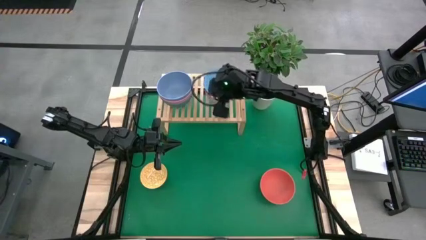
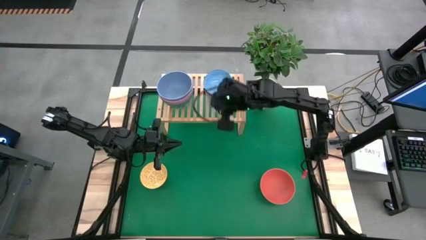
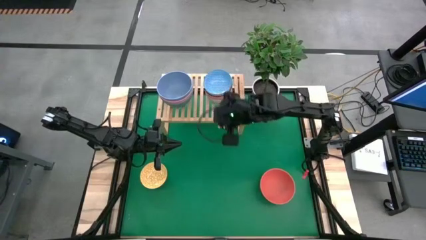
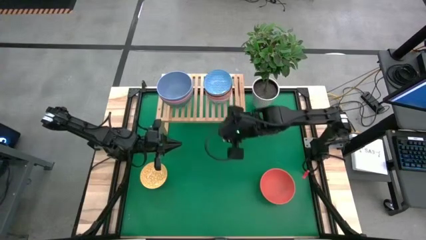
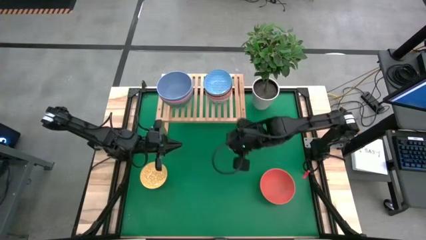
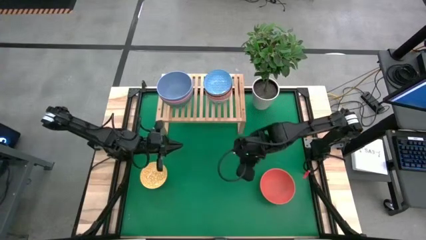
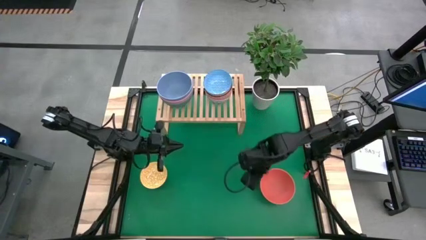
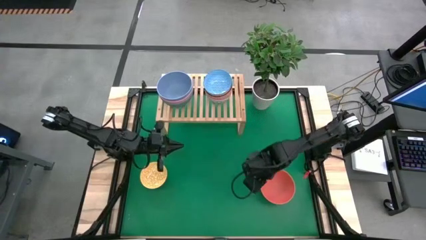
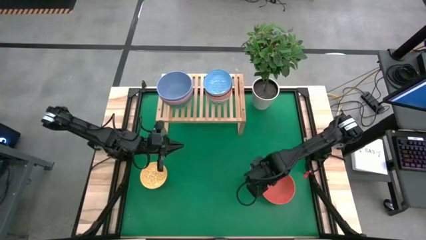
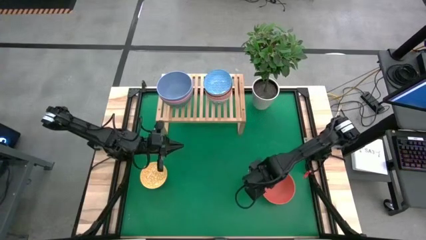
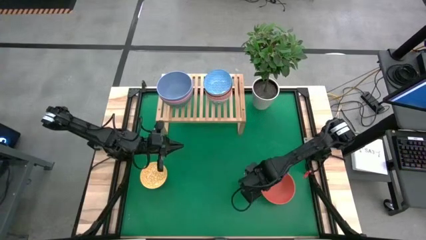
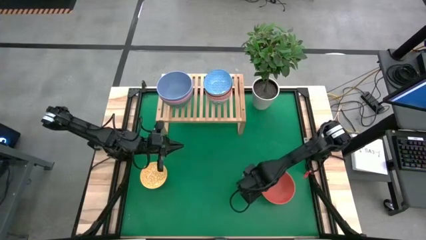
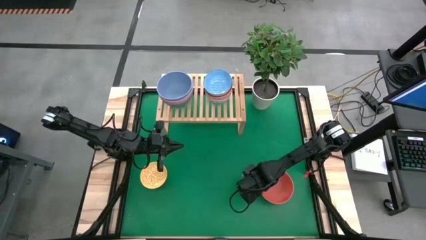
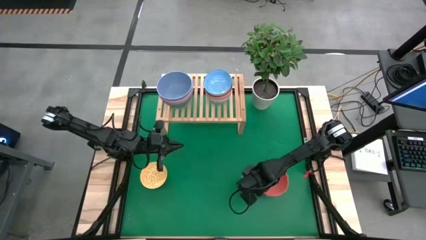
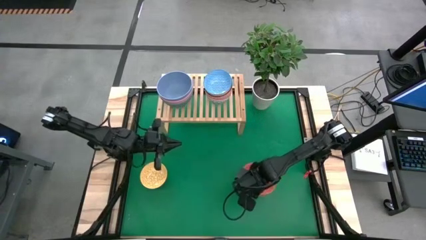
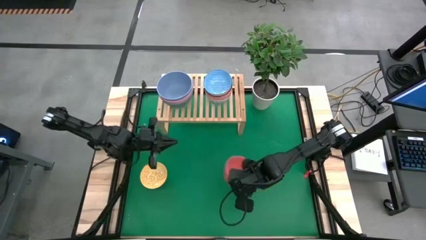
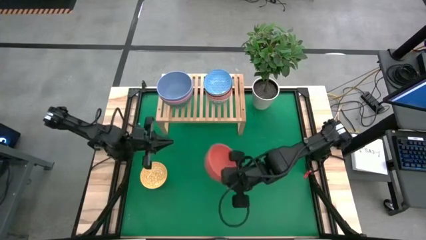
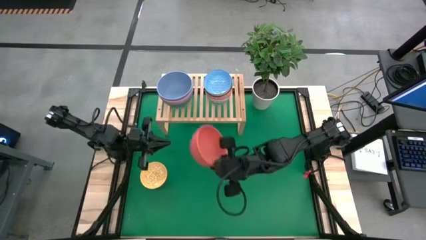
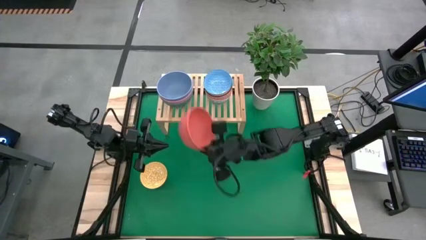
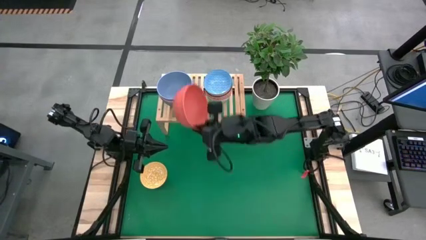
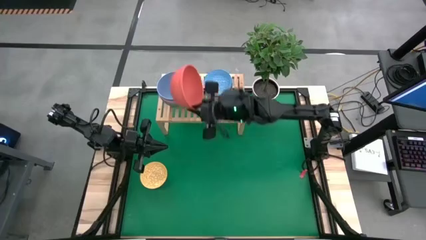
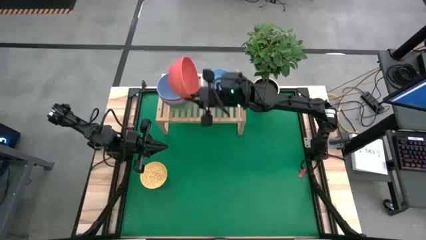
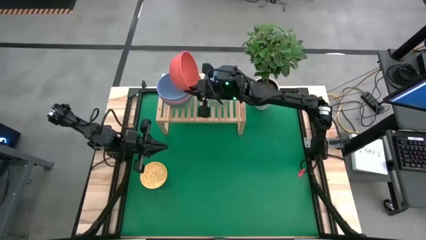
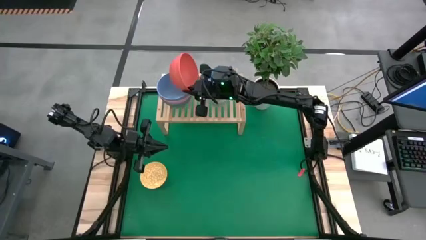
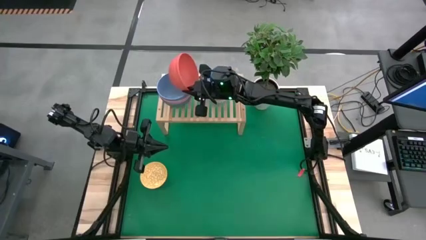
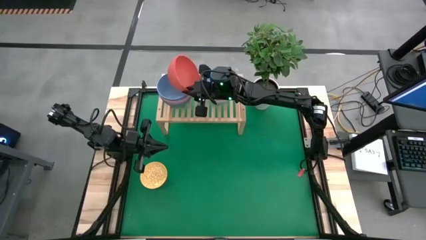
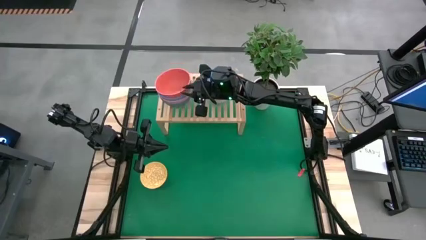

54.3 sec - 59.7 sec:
Task: Place and stack bowls onto a shelf
Stack the big orange bowl on top of the big grey bowl on the shelf

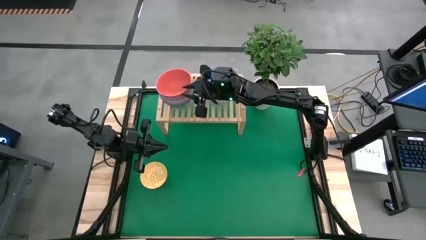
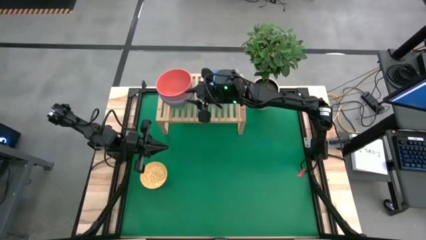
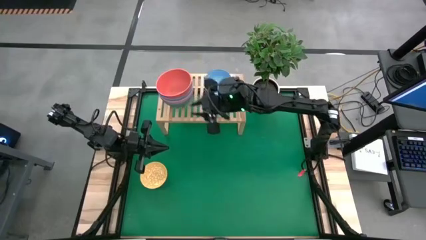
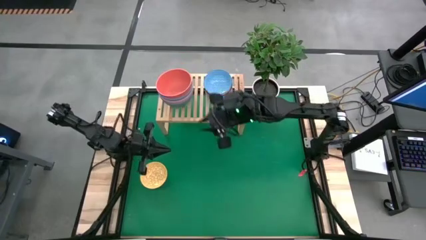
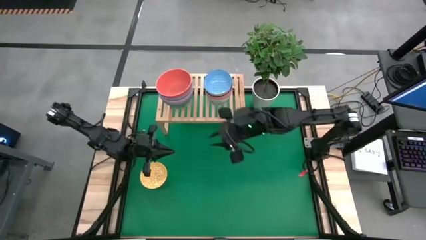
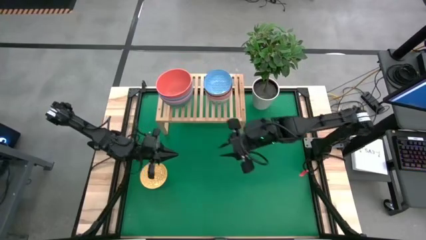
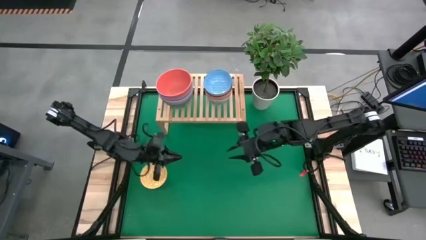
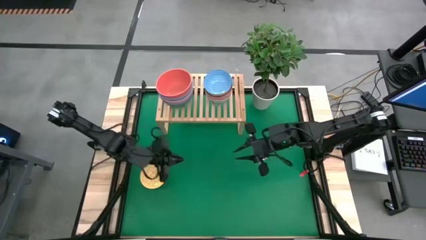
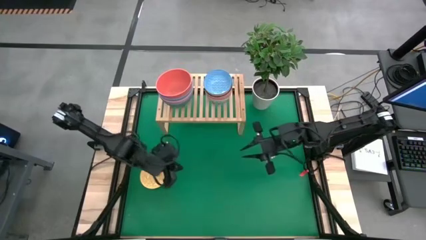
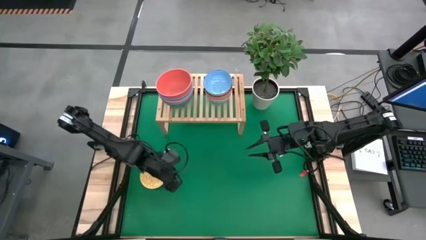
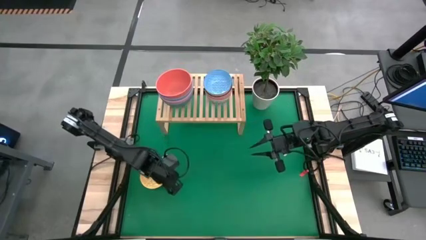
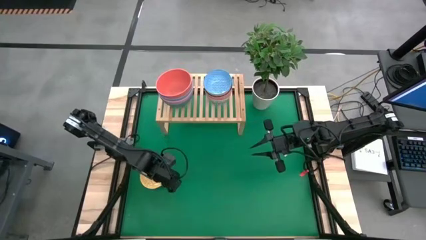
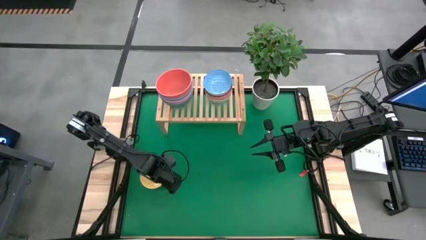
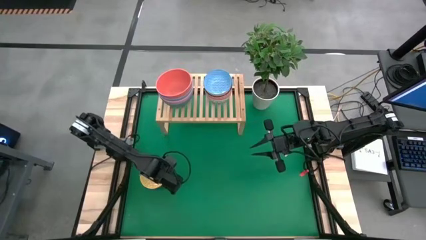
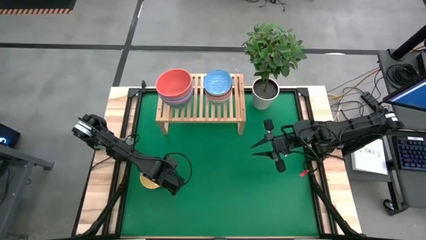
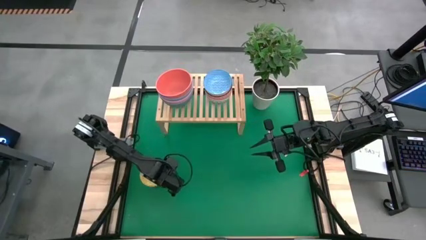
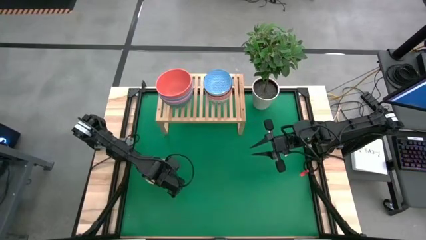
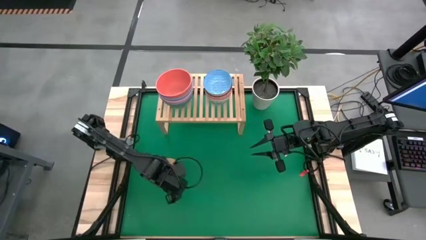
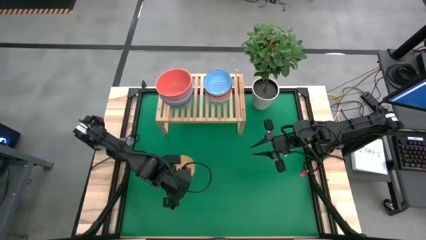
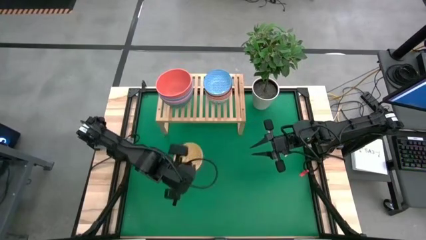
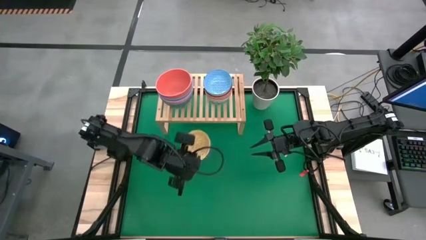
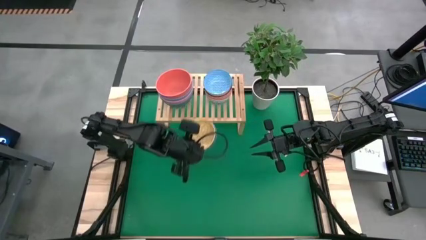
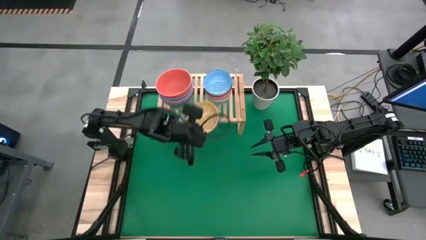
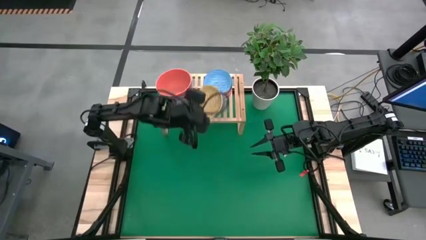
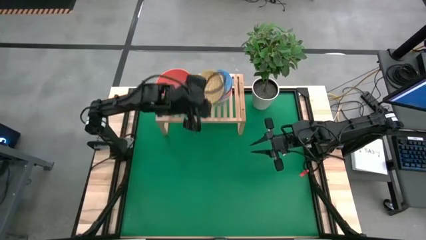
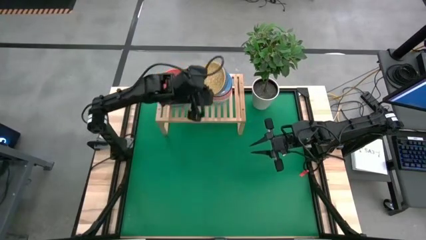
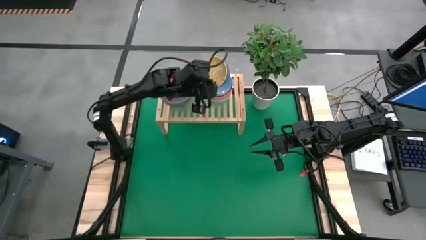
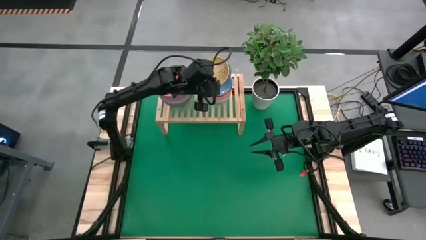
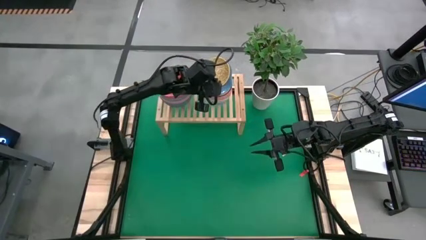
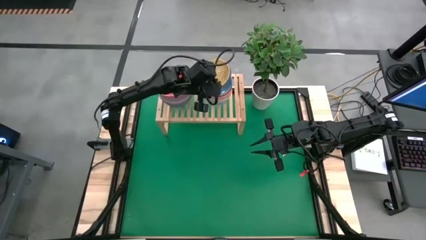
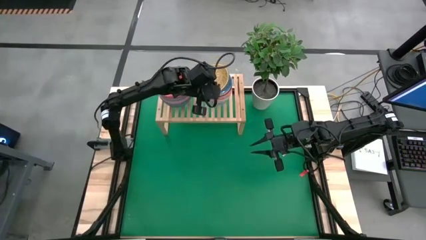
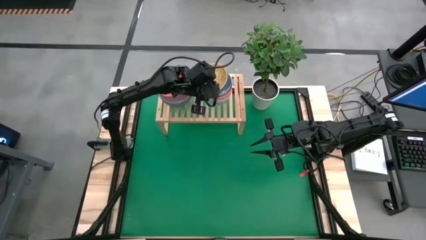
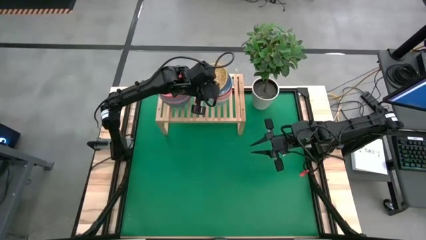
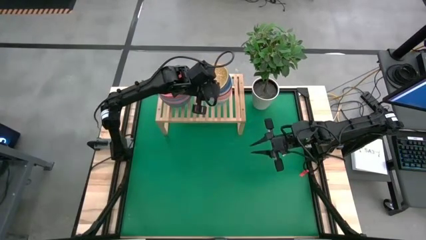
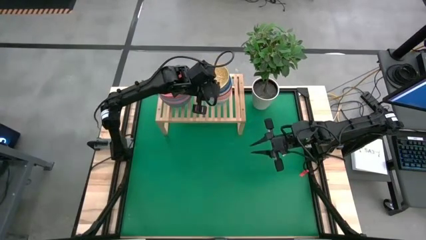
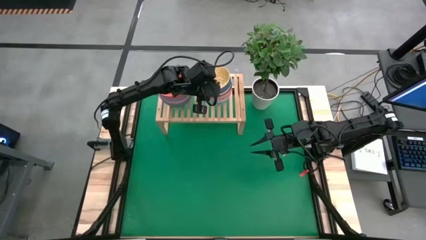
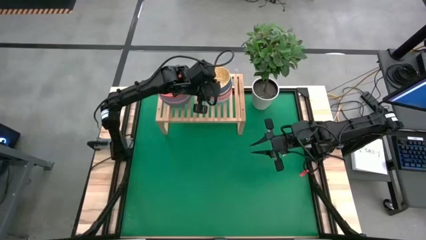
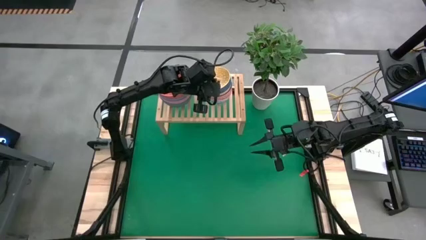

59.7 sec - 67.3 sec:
Stack the small yellow bowl on the small light blue bowl

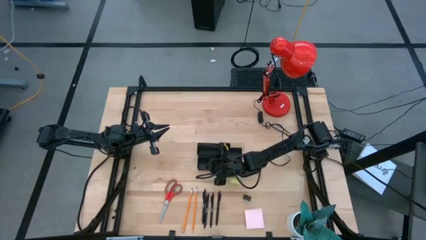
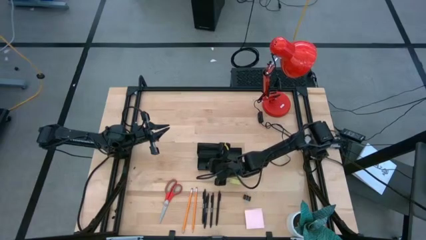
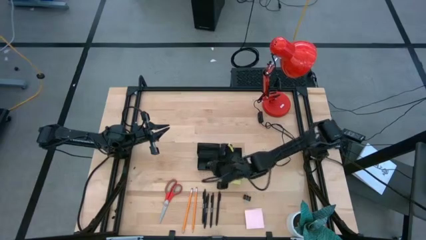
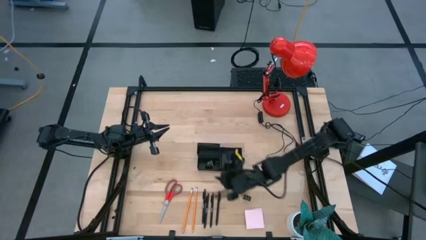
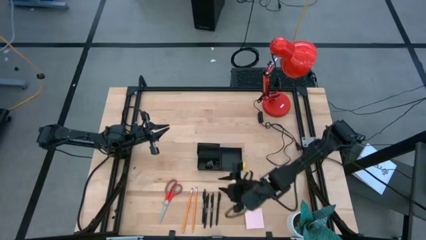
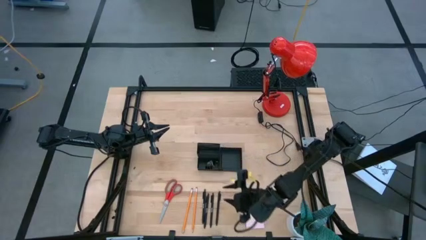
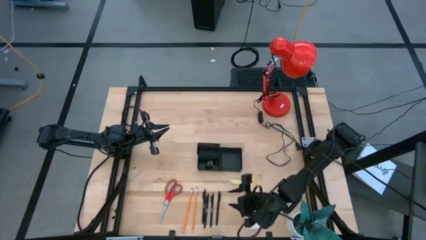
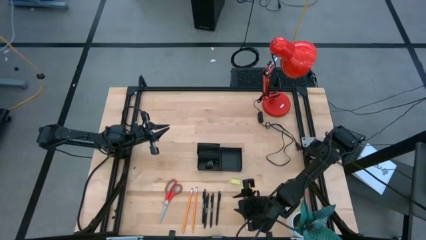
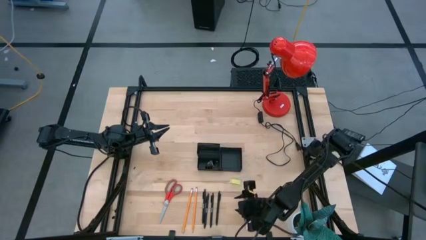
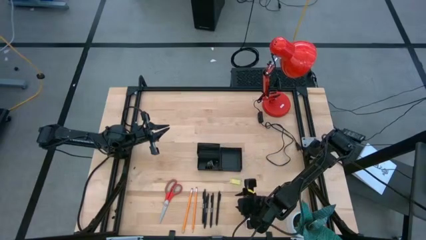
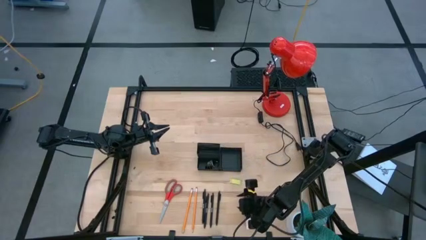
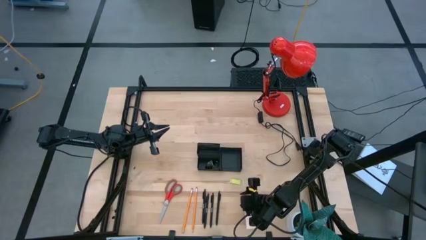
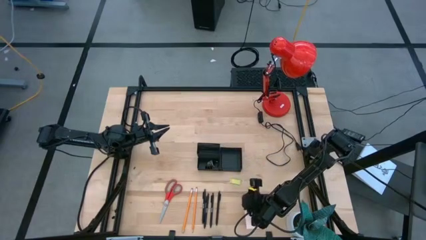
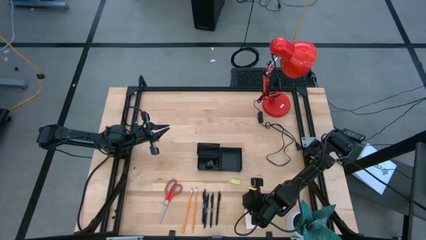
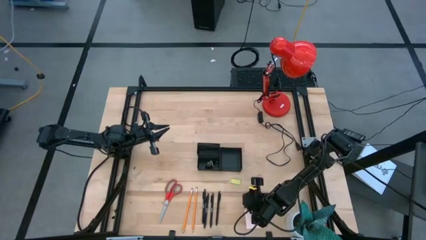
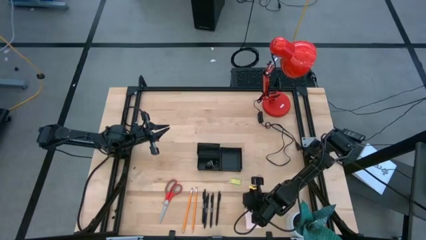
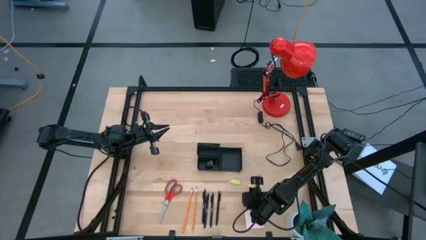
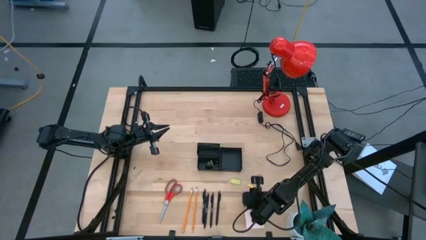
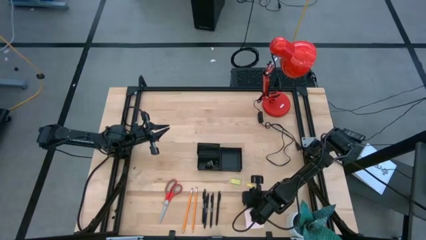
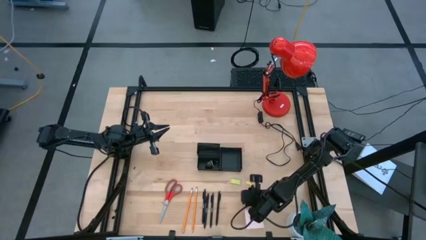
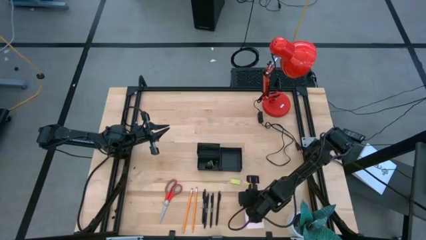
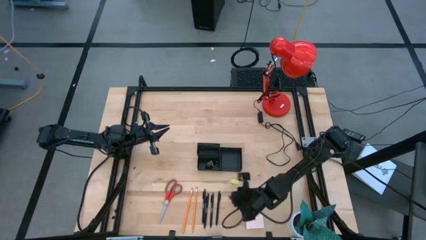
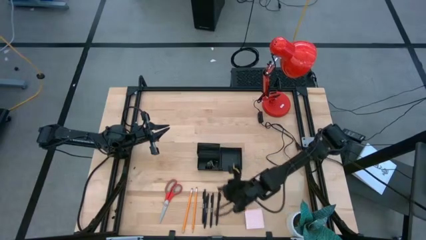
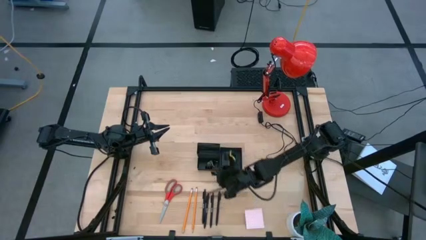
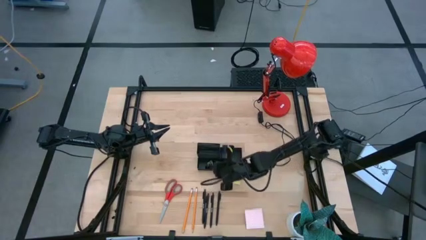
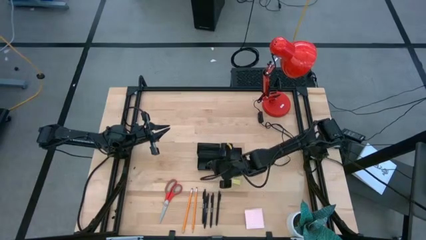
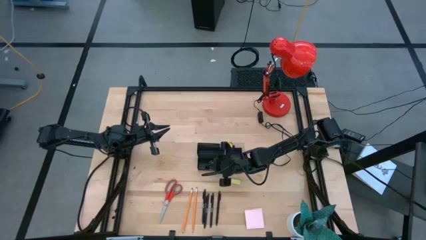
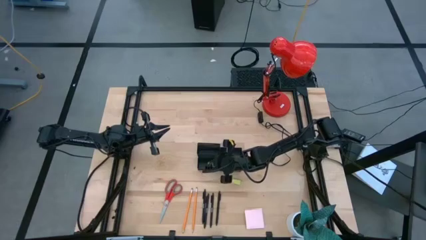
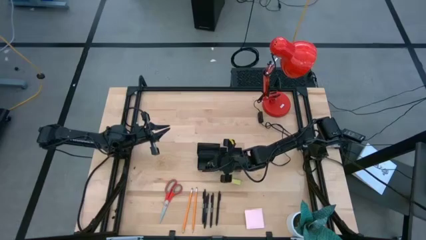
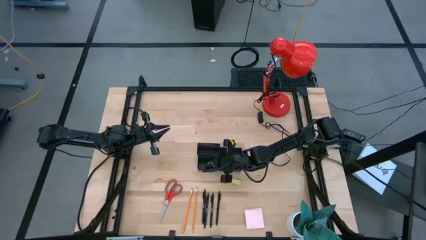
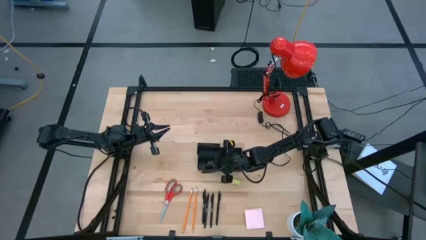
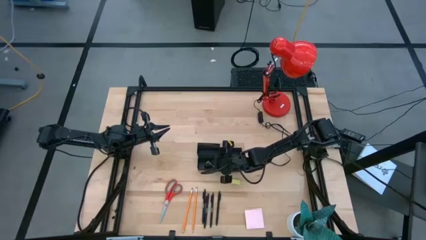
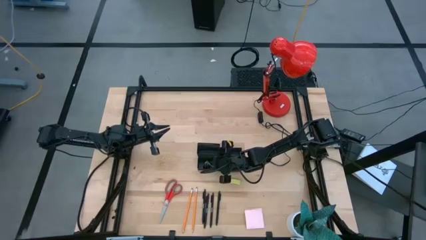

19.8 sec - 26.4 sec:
Task: Pick and place office supplies into organizer
Put the black binder clip into the black desk organizer
